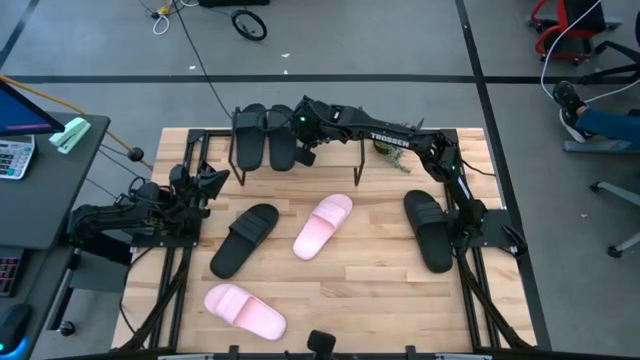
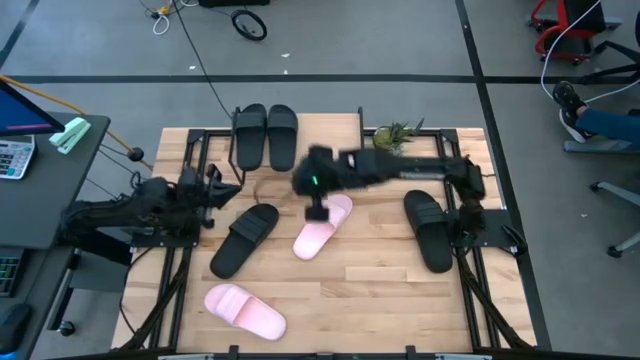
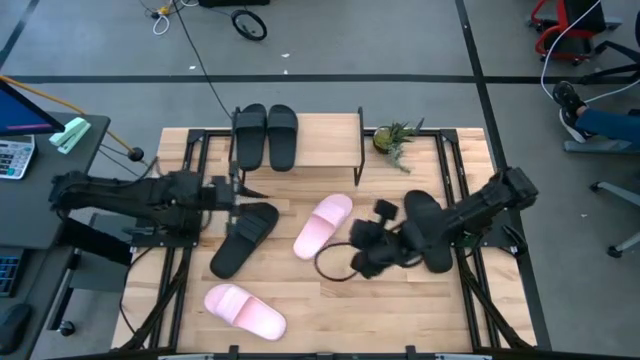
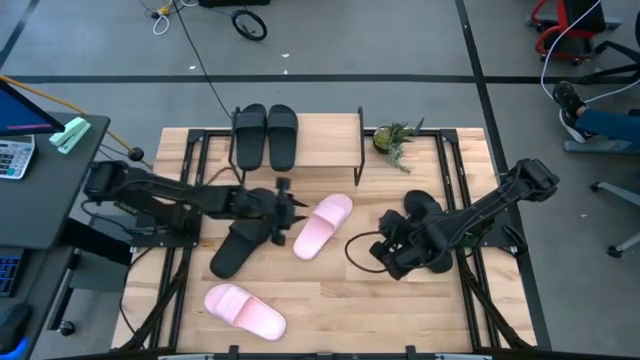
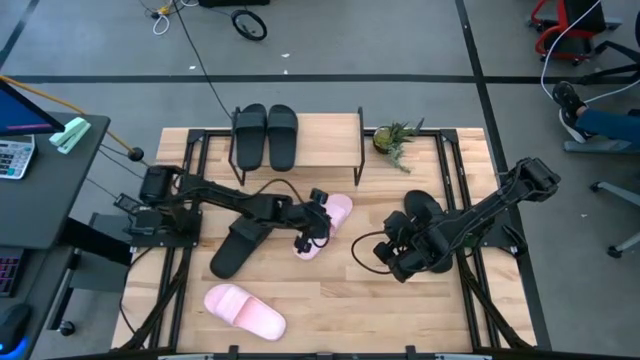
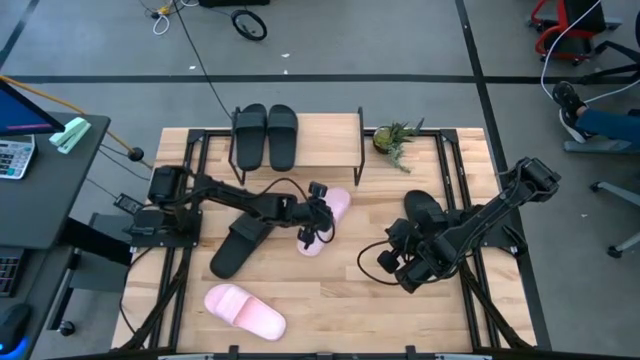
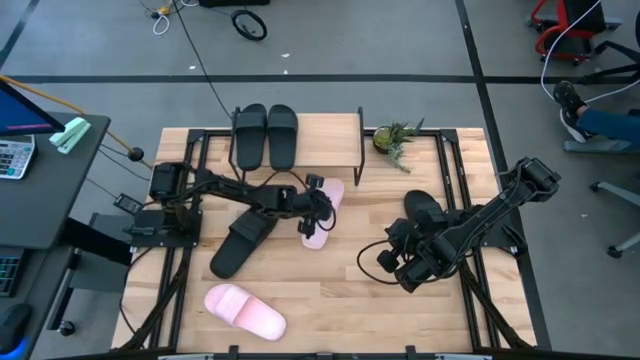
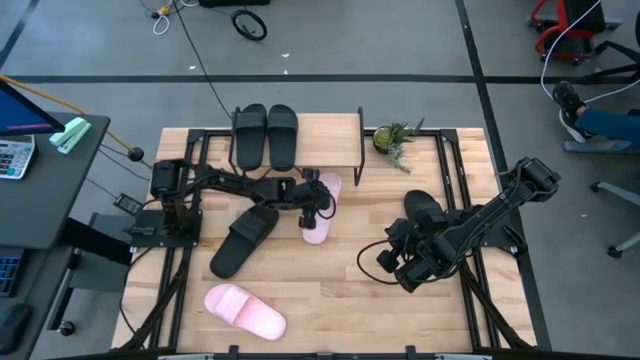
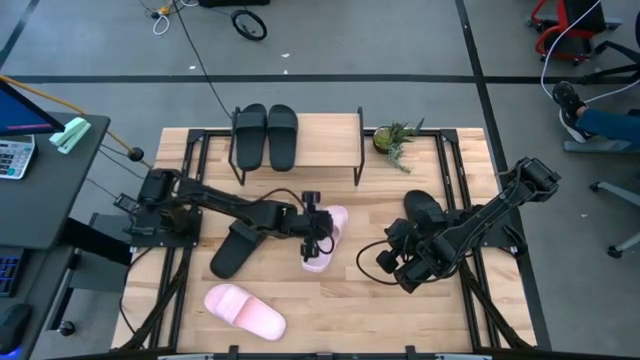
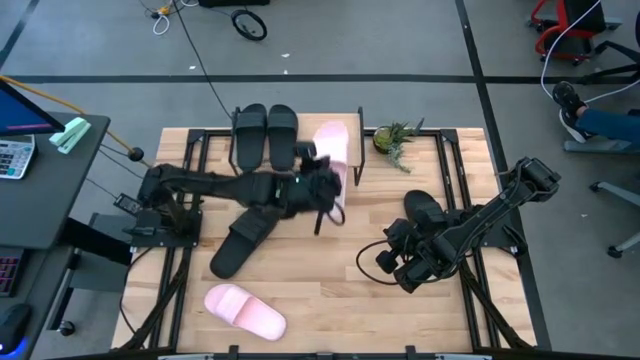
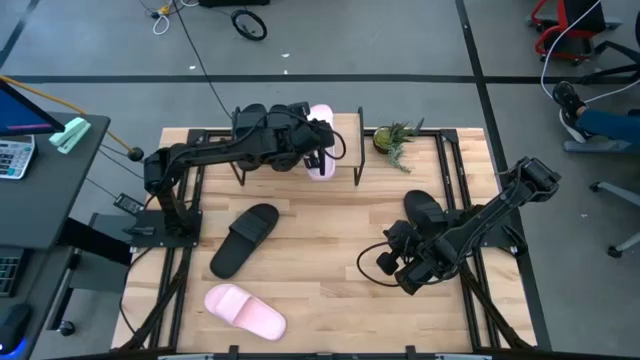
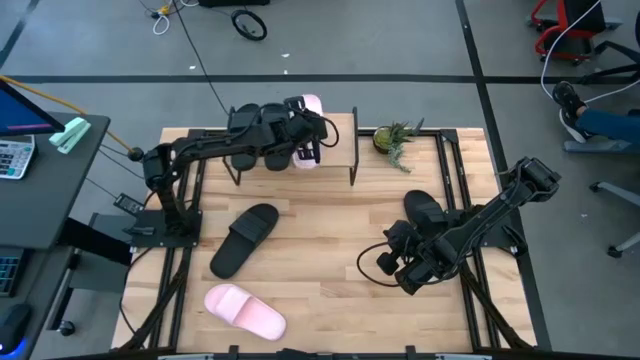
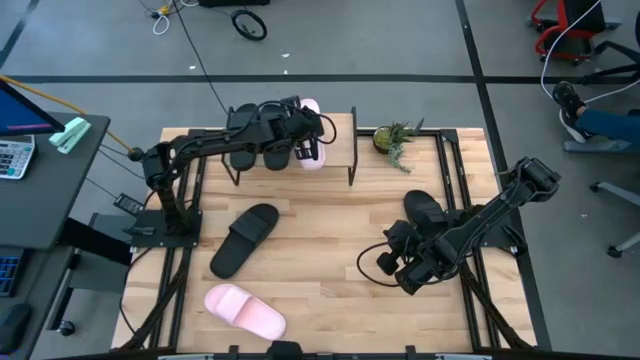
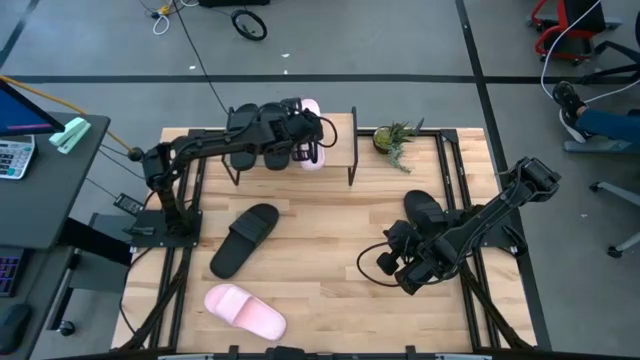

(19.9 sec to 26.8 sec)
Task: Pick and place slides into the shelf
Put the pink slipper on the shelf

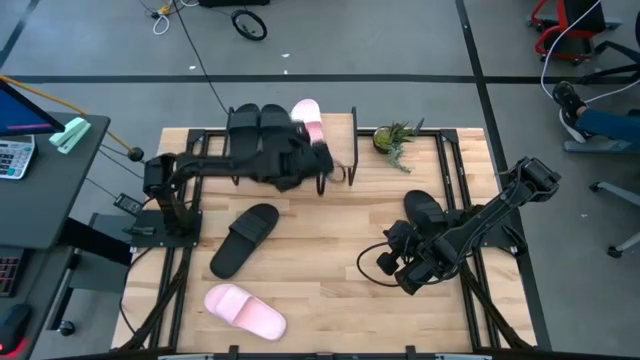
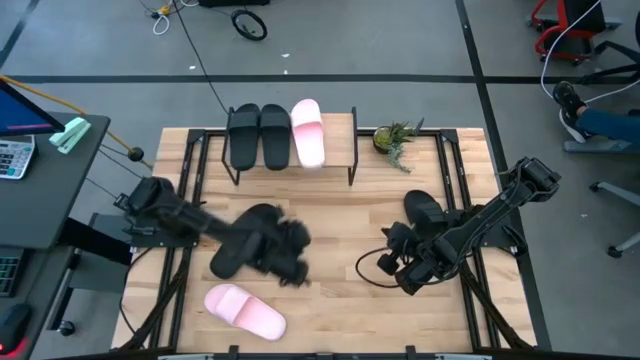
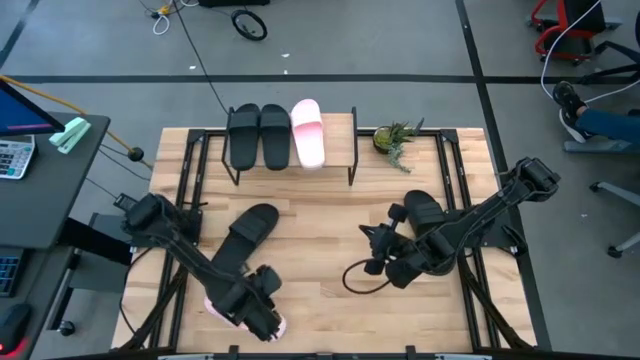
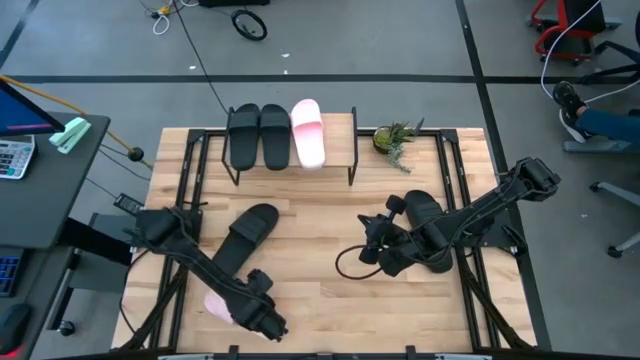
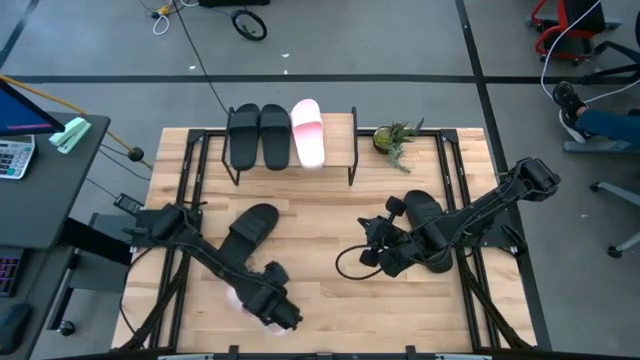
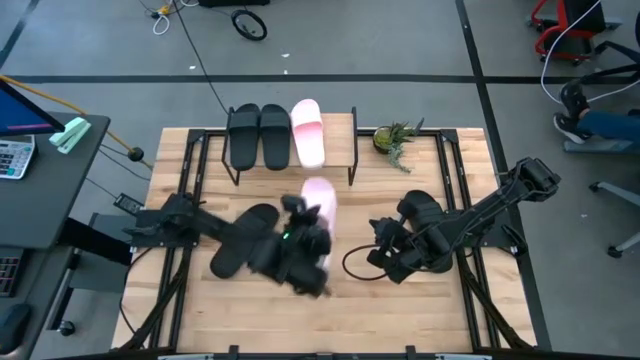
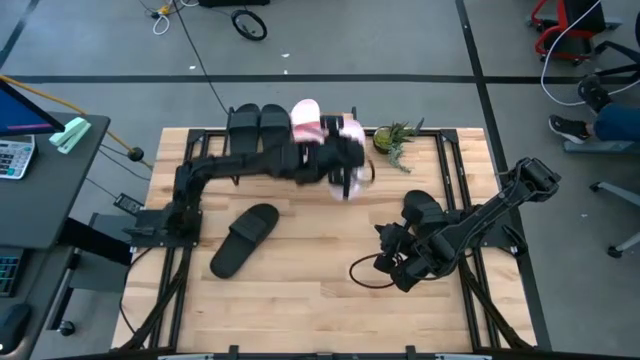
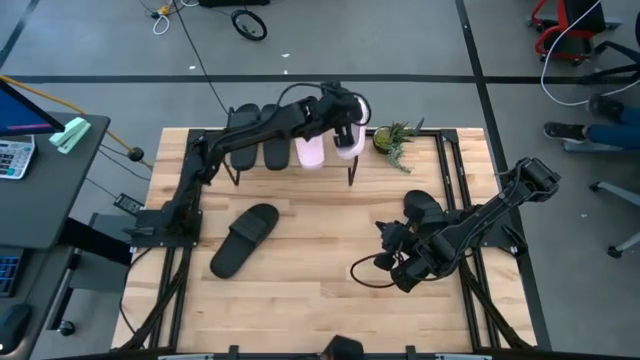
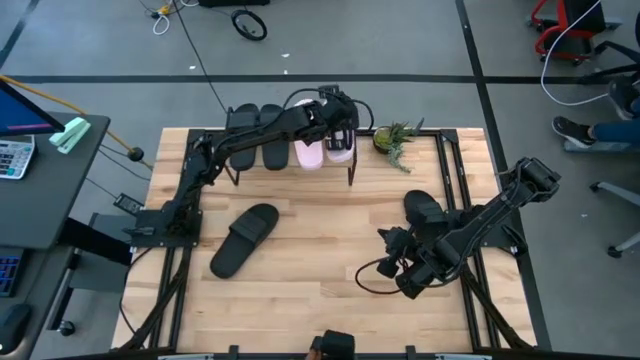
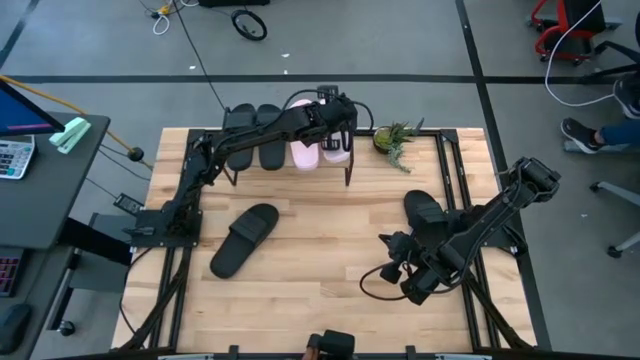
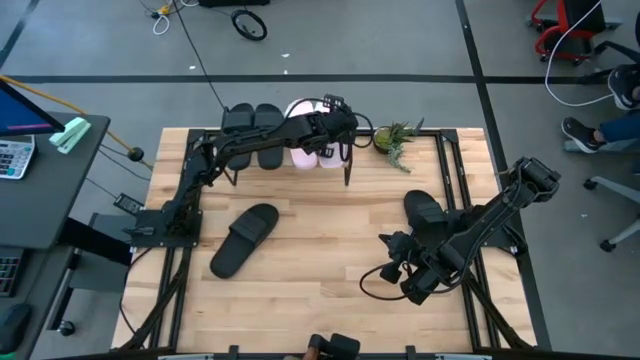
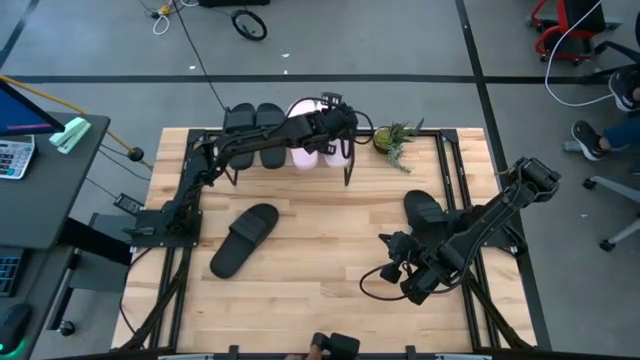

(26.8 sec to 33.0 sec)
Put the pink slipper on the shelf

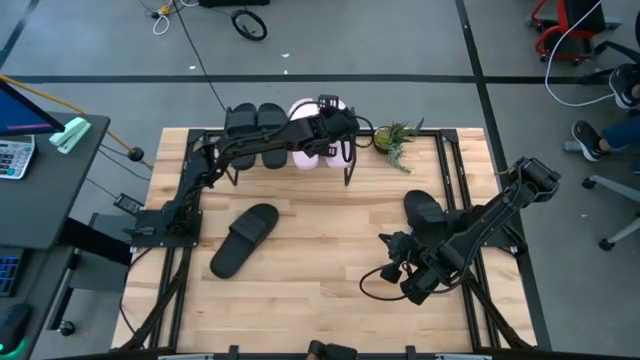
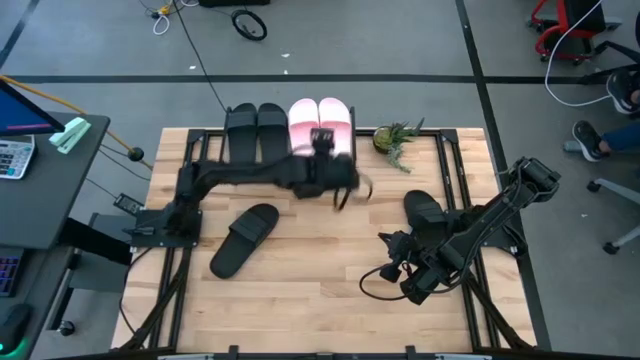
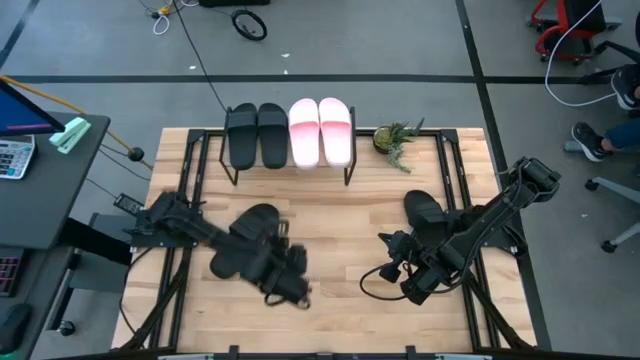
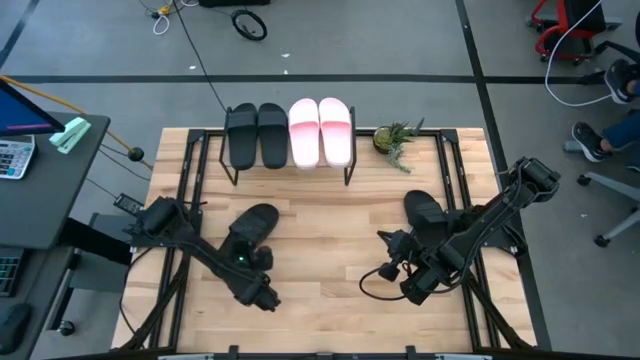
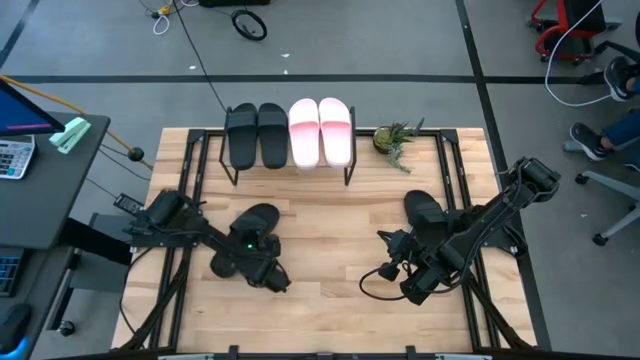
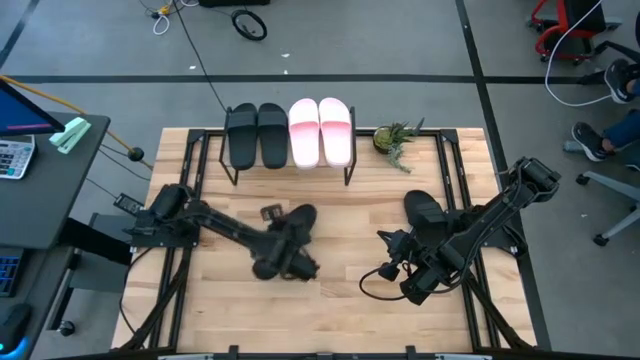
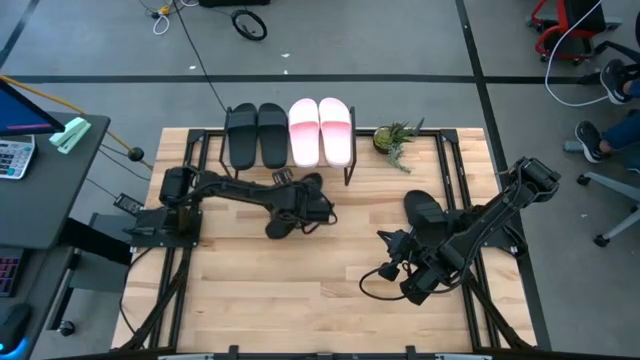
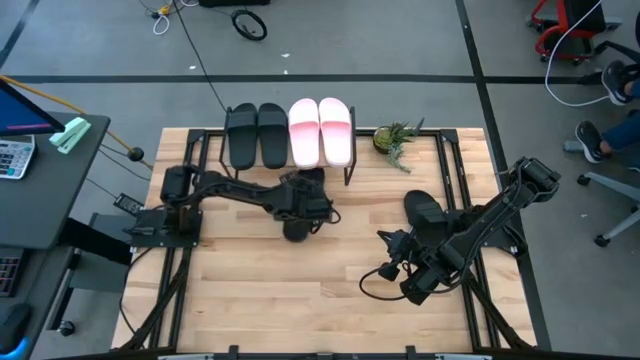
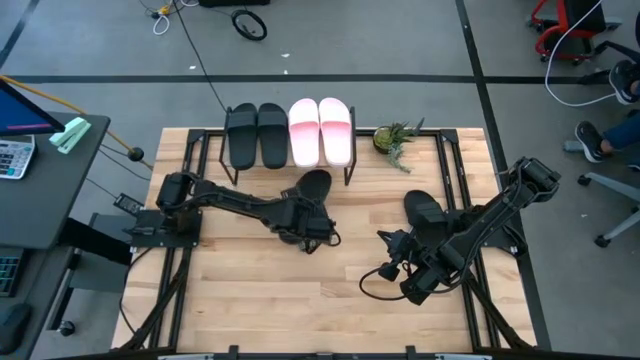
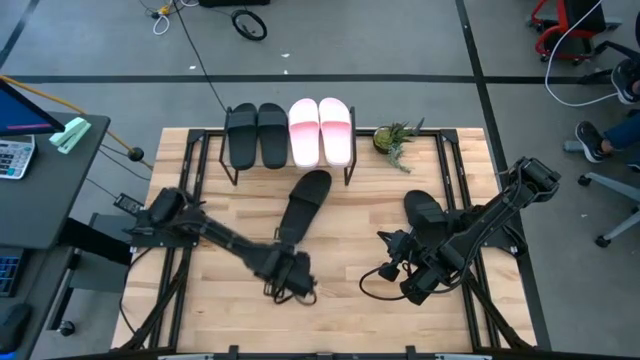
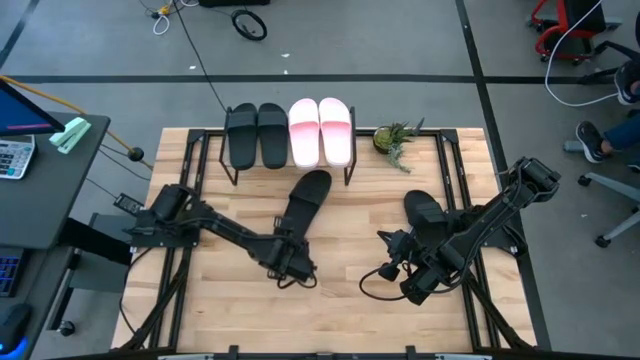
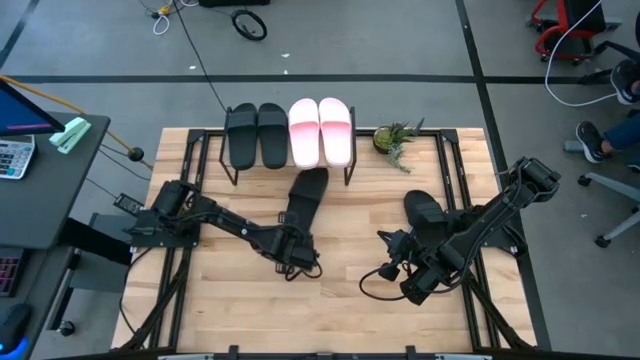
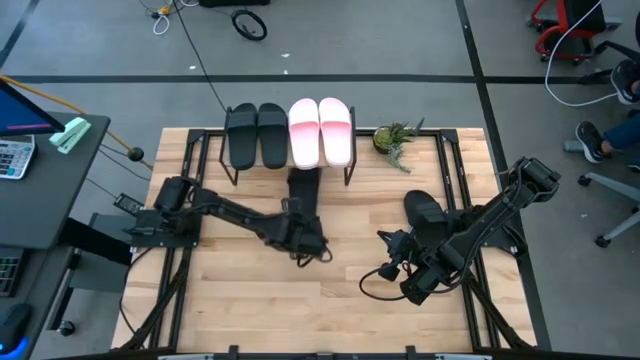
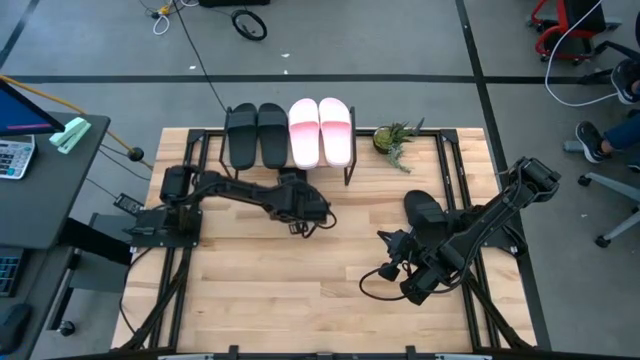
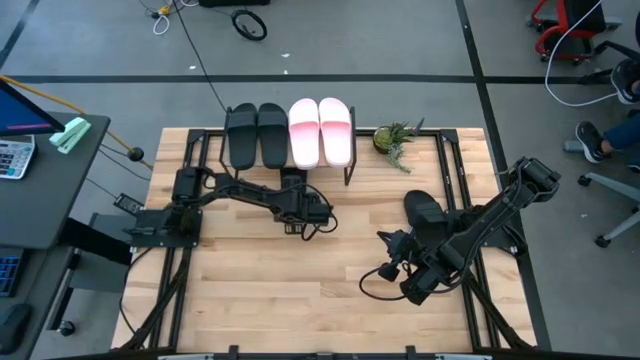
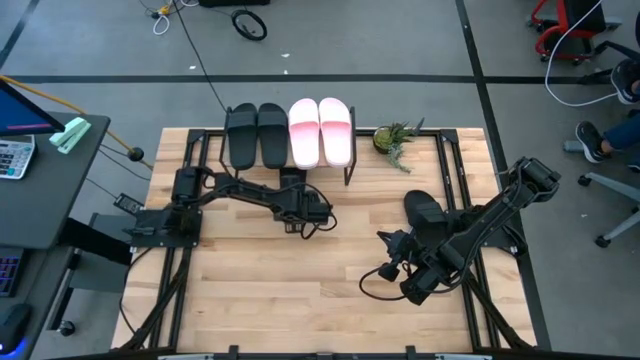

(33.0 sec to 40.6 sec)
Put the black slipper under the shelf
